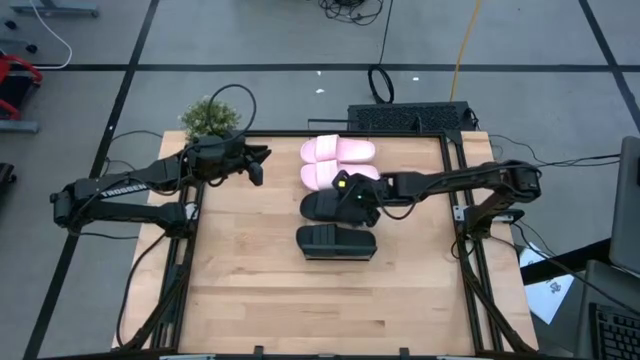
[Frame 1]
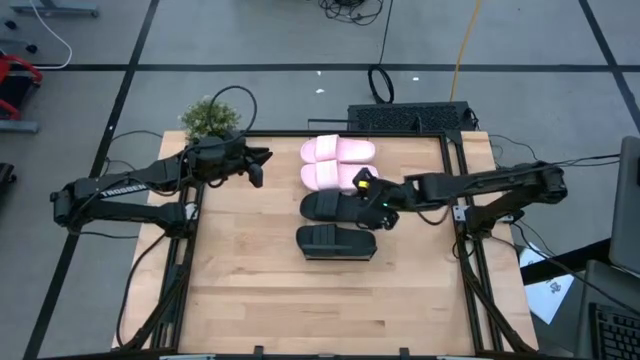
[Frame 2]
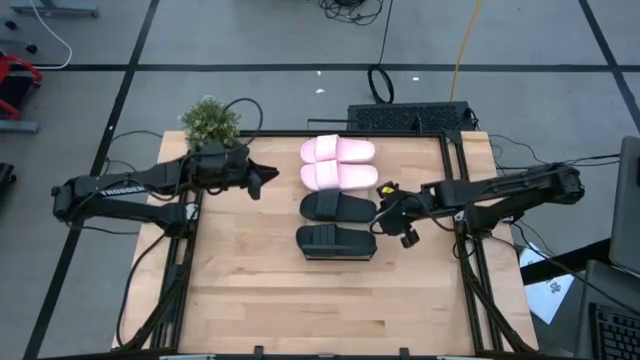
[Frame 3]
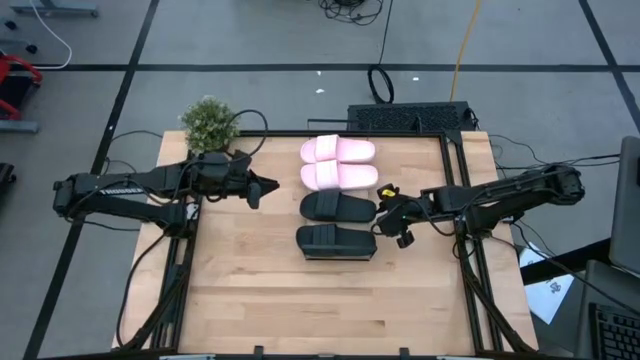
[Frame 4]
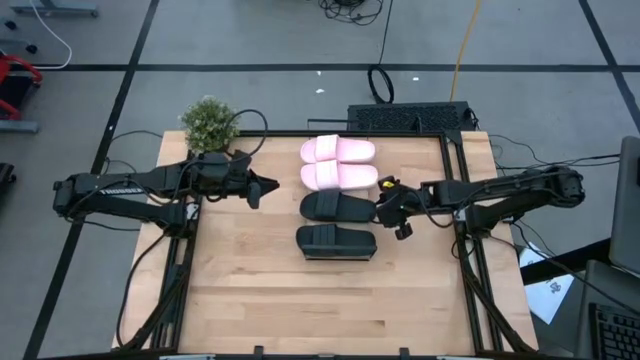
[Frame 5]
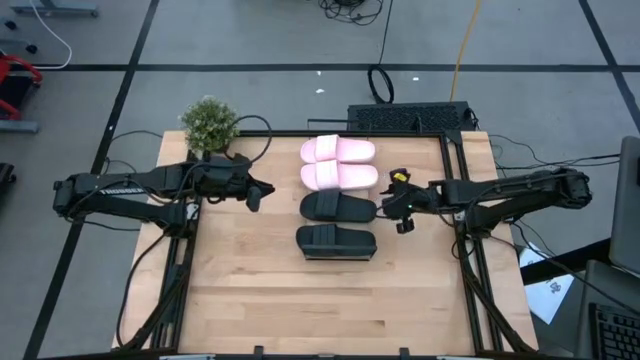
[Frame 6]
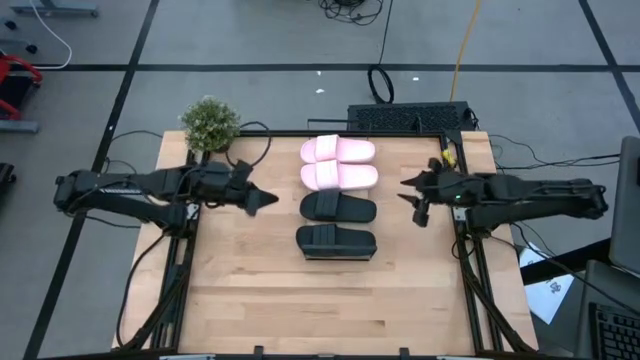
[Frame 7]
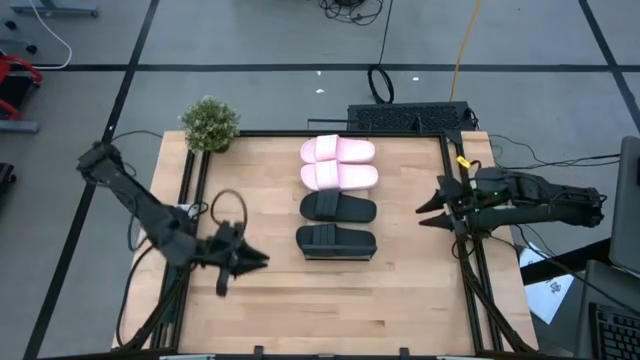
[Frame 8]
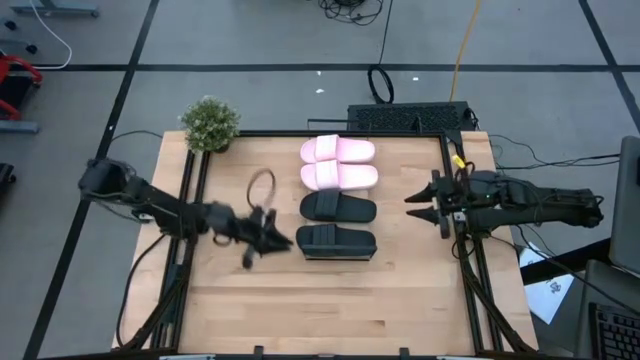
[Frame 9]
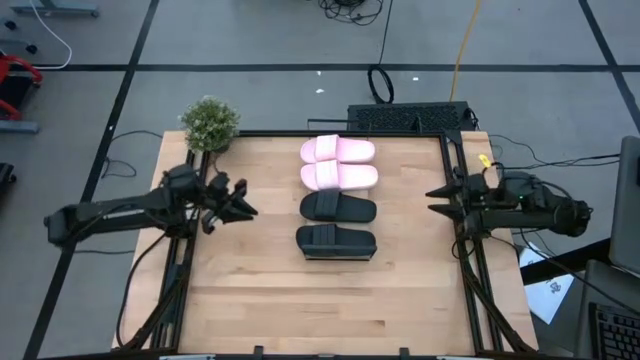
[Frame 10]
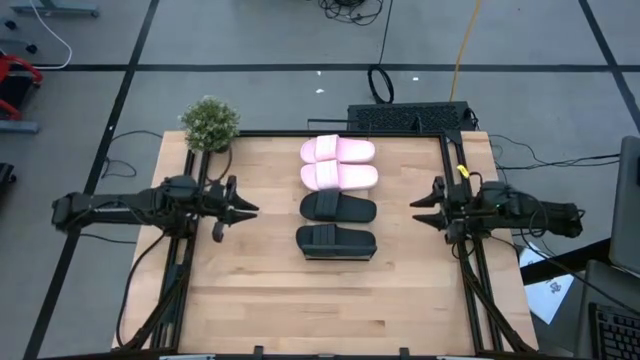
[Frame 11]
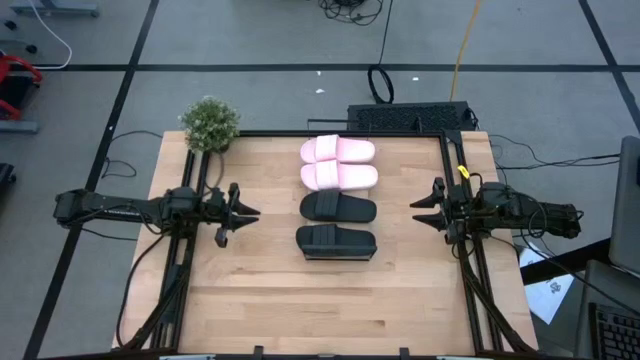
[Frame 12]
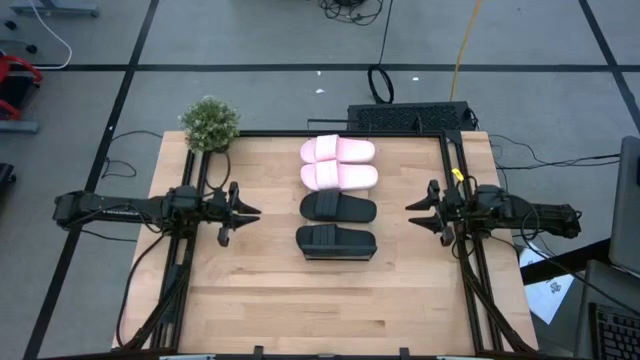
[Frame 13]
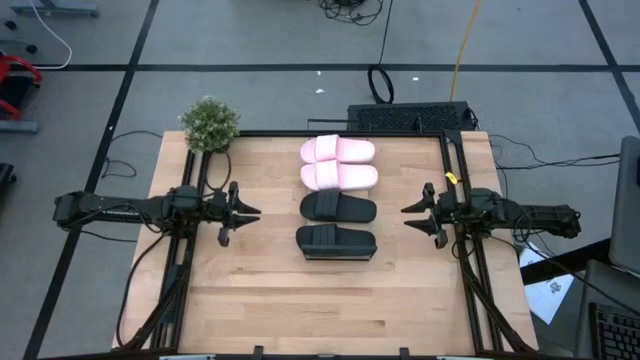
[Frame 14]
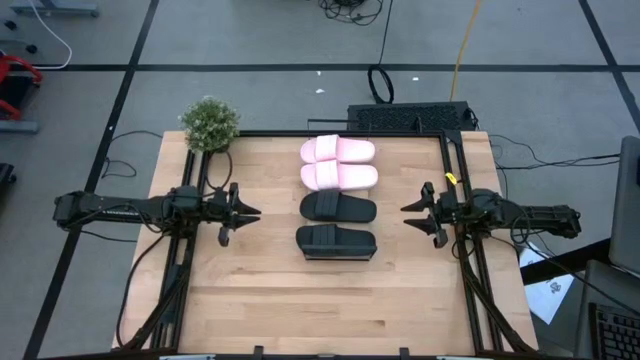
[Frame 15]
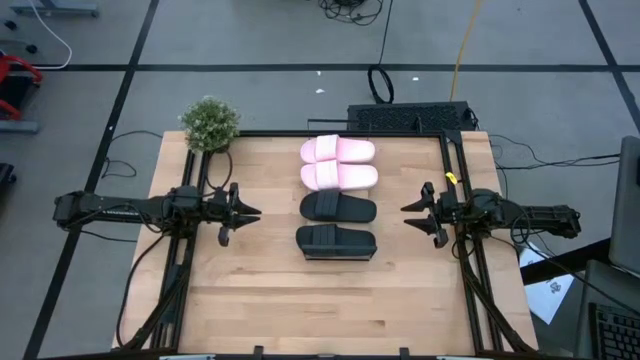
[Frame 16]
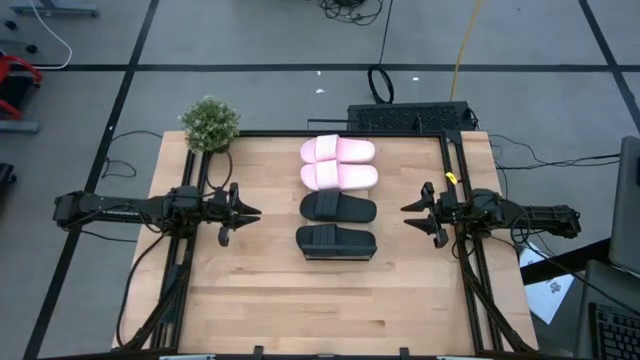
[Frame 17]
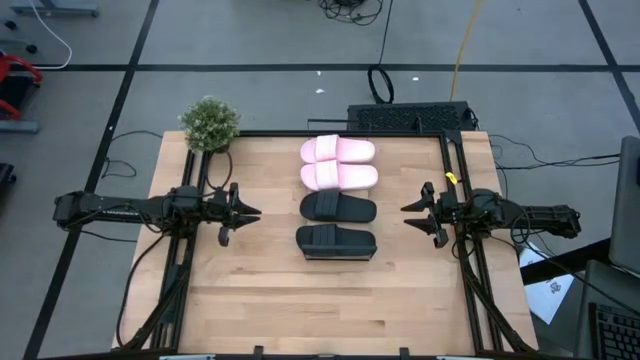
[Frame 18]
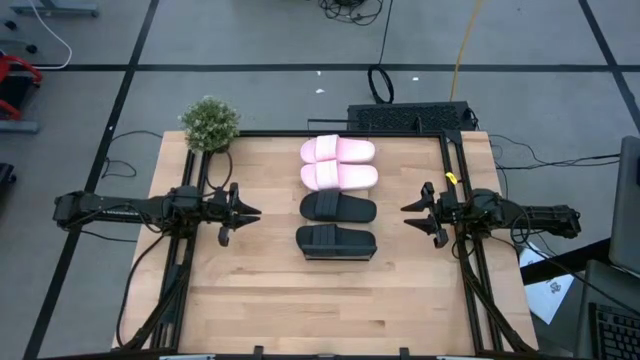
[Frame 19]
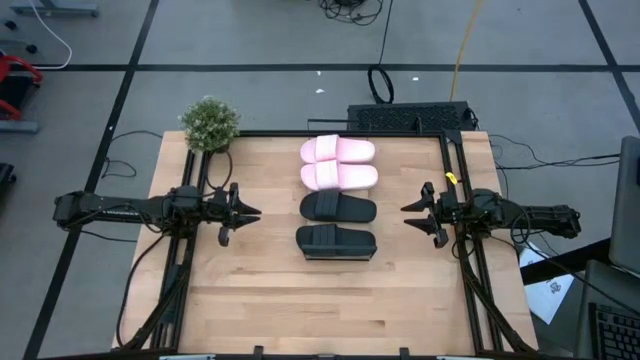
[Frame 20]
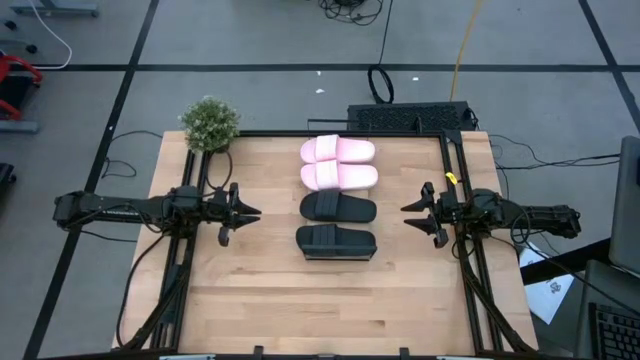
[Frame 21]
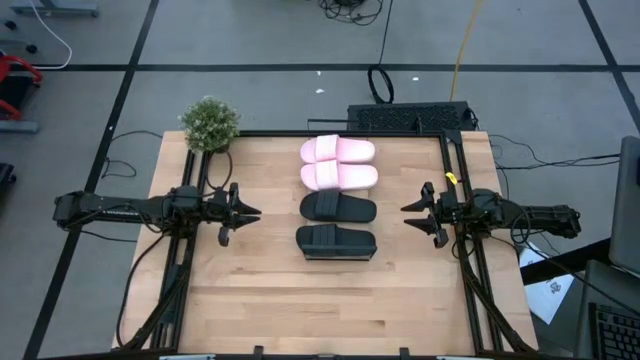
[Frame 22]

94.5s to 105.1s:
Task: Pick and place slides into the shelf
Return to Home Position
